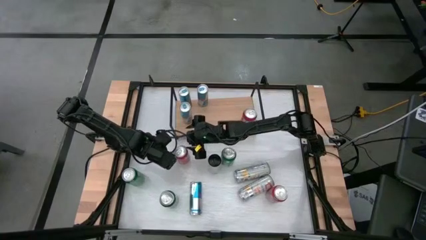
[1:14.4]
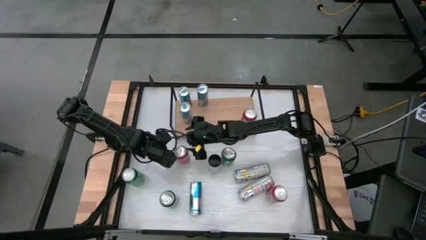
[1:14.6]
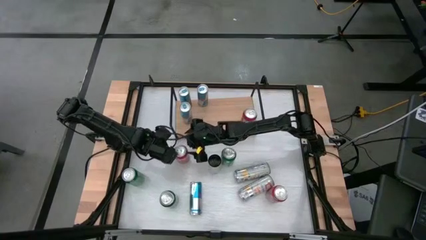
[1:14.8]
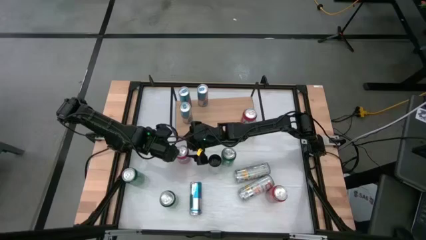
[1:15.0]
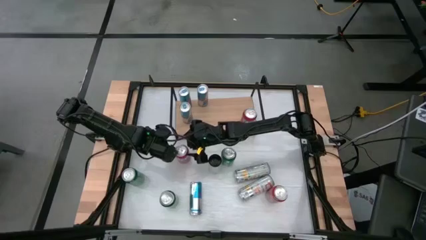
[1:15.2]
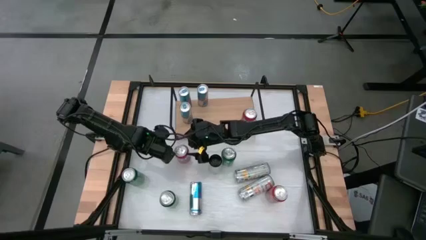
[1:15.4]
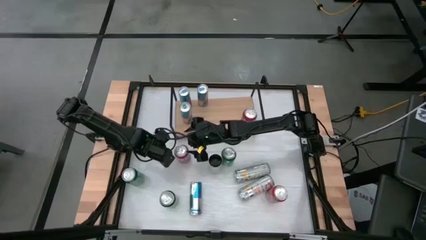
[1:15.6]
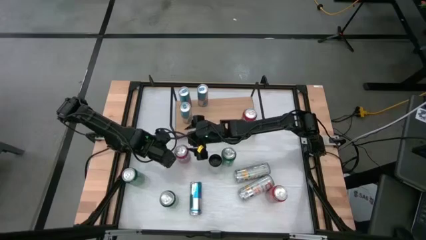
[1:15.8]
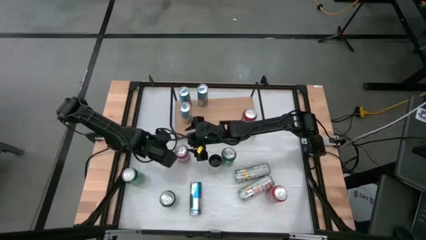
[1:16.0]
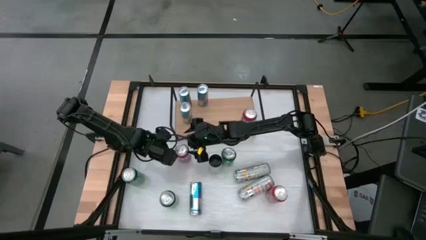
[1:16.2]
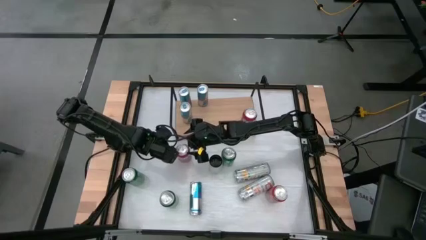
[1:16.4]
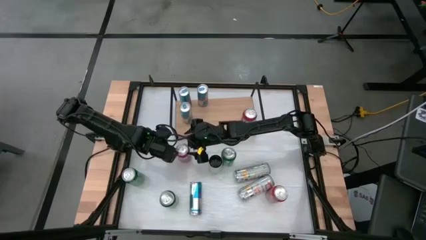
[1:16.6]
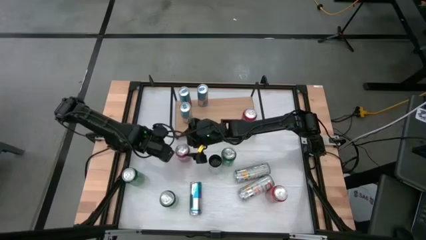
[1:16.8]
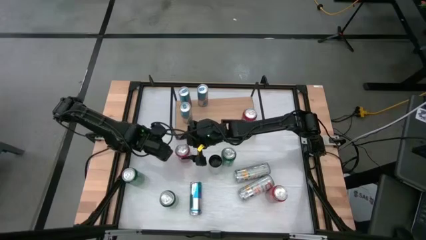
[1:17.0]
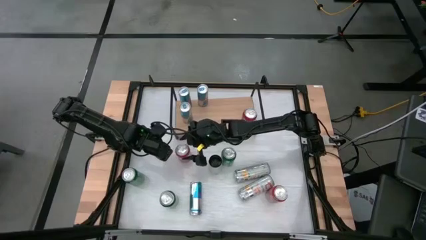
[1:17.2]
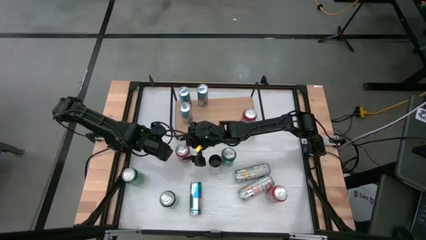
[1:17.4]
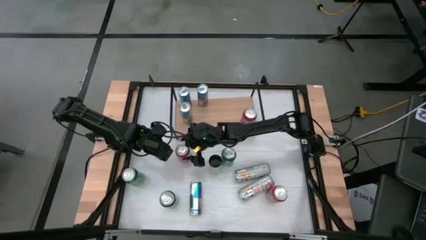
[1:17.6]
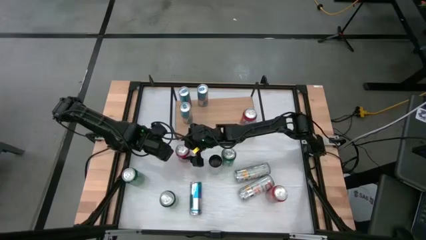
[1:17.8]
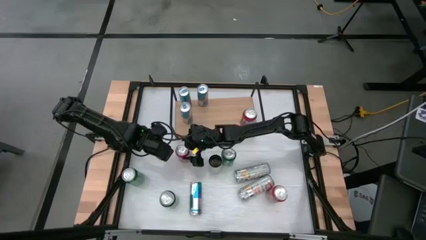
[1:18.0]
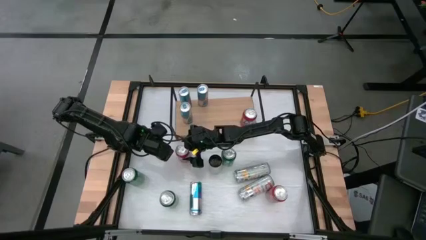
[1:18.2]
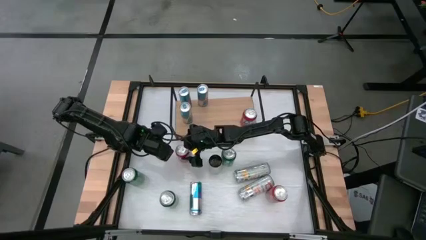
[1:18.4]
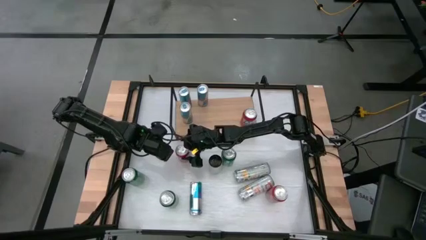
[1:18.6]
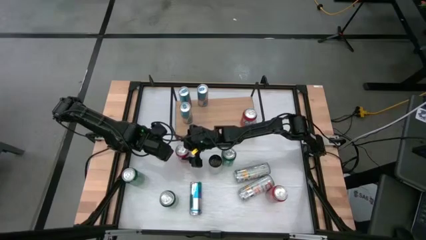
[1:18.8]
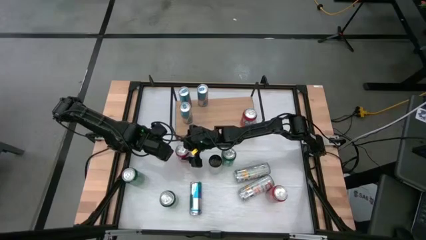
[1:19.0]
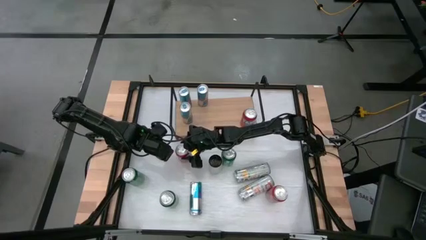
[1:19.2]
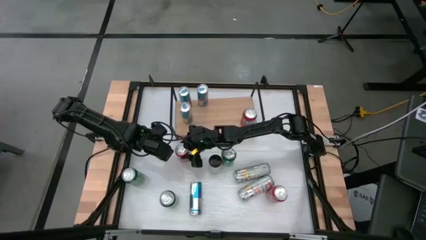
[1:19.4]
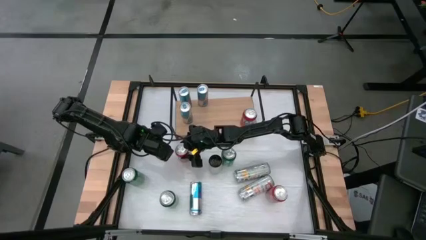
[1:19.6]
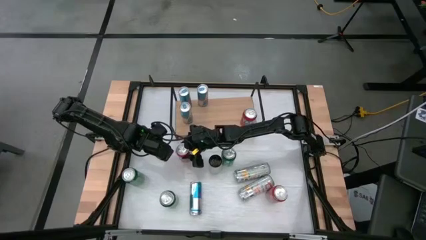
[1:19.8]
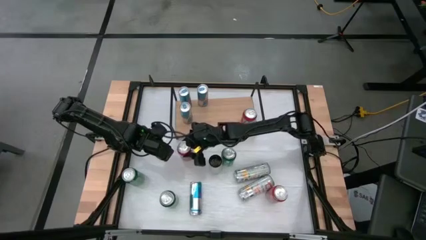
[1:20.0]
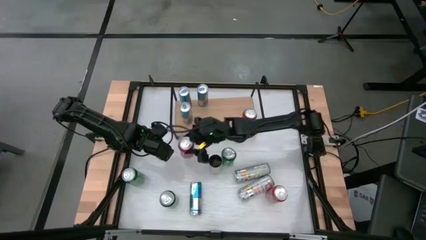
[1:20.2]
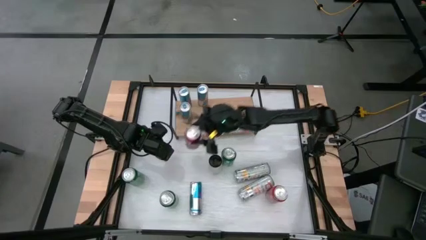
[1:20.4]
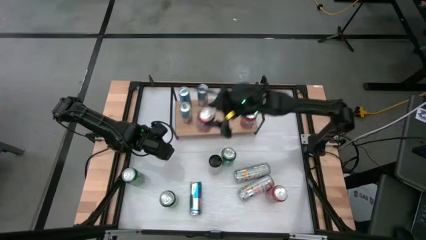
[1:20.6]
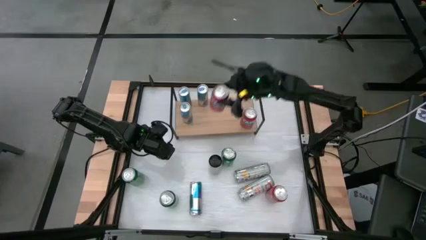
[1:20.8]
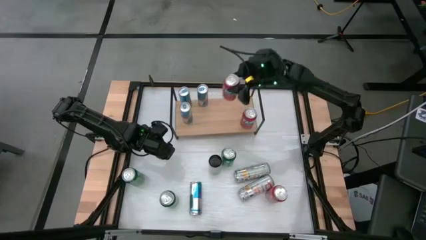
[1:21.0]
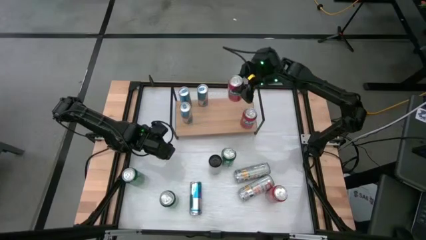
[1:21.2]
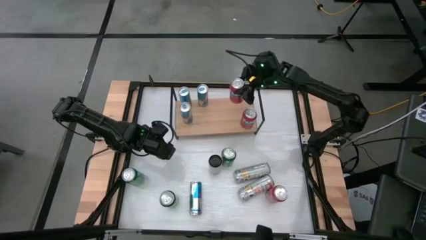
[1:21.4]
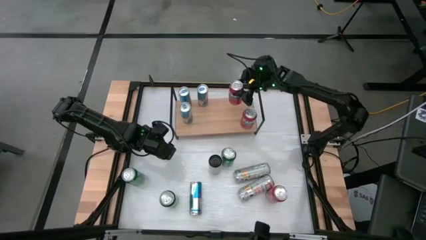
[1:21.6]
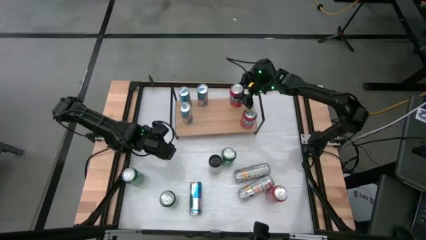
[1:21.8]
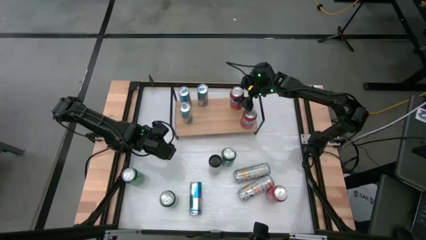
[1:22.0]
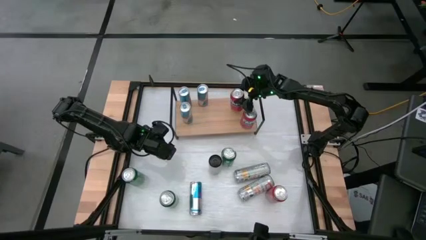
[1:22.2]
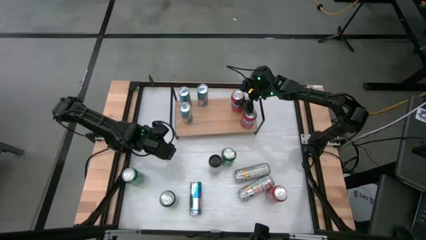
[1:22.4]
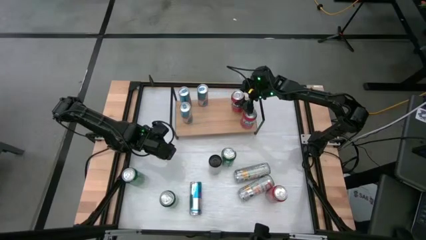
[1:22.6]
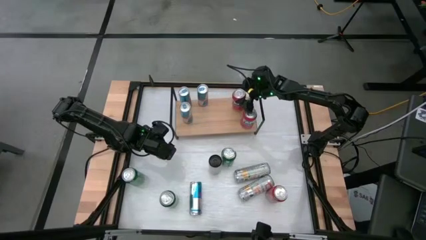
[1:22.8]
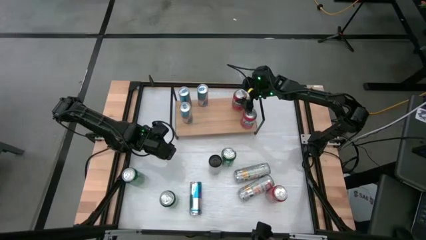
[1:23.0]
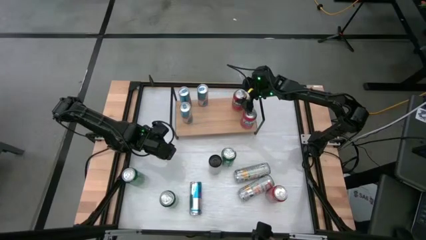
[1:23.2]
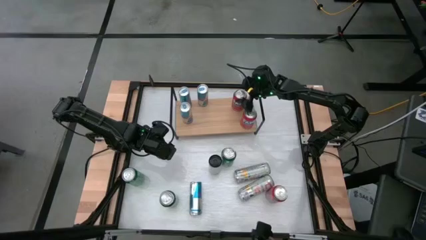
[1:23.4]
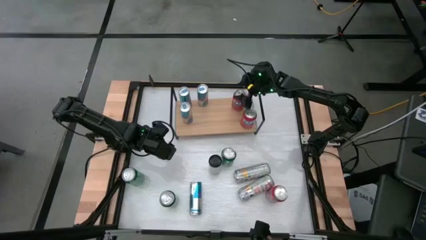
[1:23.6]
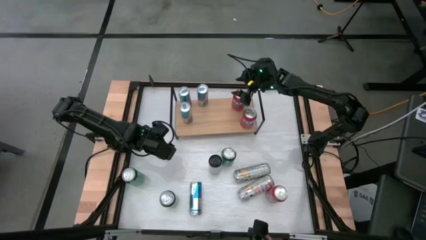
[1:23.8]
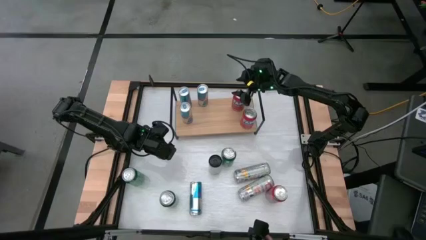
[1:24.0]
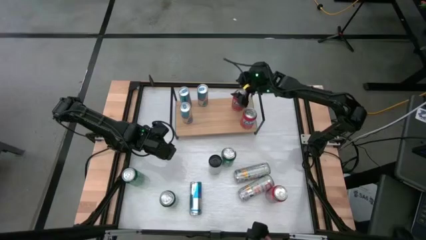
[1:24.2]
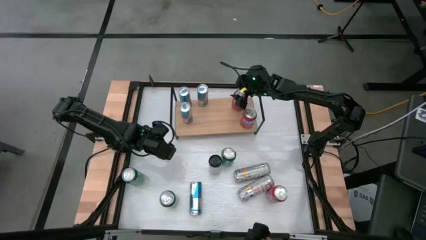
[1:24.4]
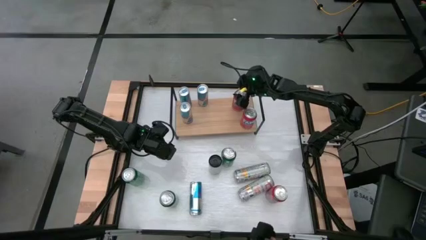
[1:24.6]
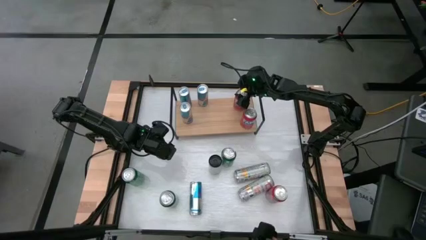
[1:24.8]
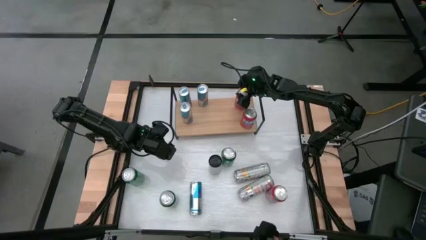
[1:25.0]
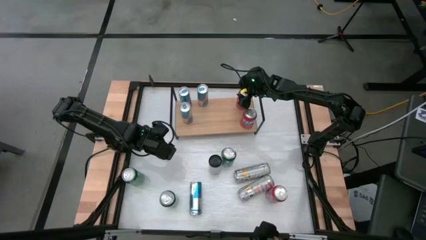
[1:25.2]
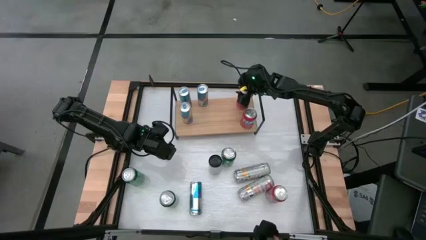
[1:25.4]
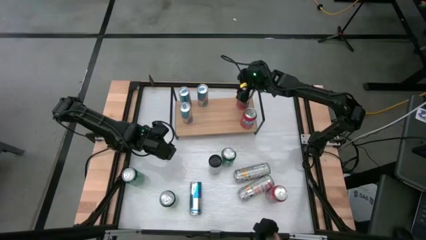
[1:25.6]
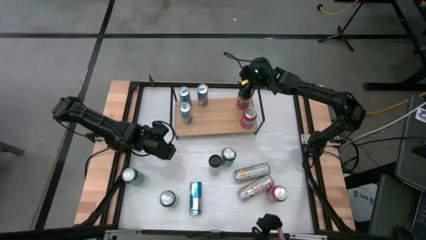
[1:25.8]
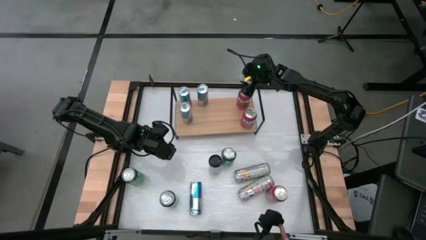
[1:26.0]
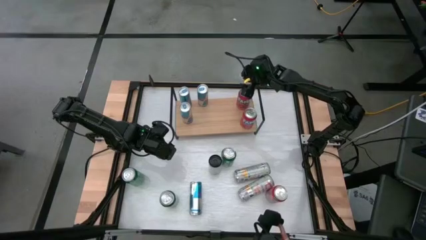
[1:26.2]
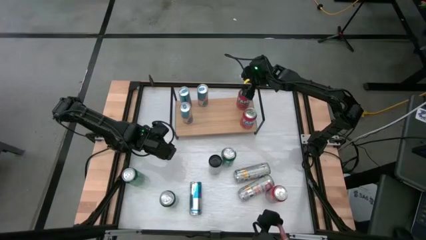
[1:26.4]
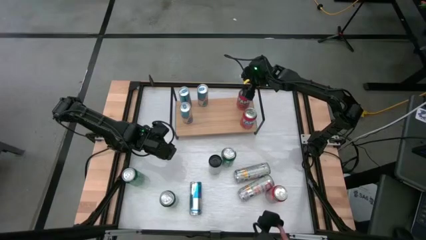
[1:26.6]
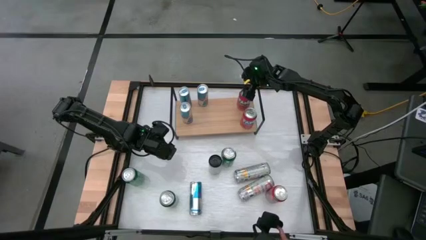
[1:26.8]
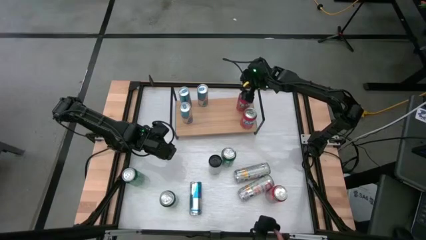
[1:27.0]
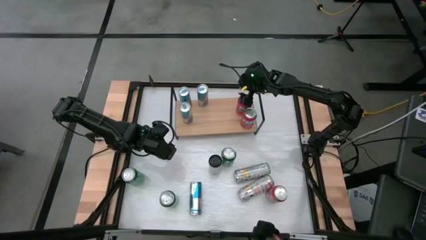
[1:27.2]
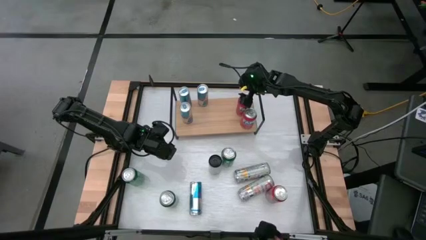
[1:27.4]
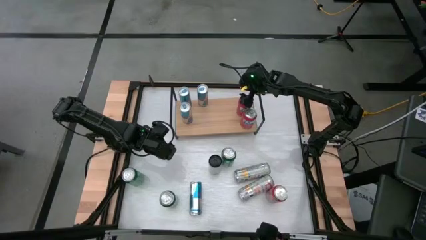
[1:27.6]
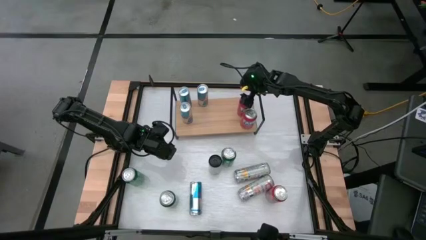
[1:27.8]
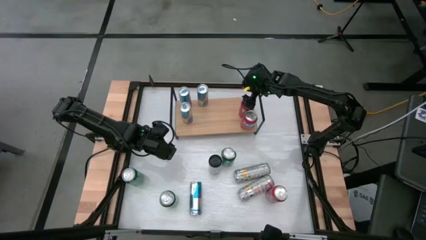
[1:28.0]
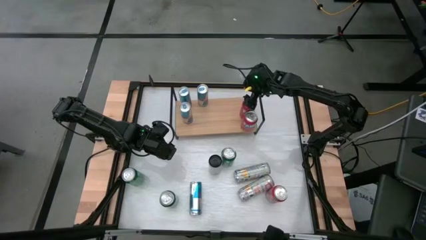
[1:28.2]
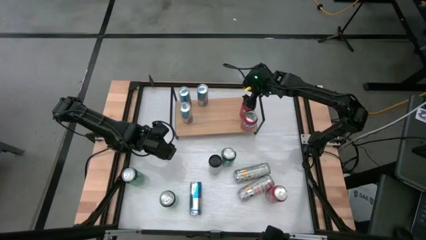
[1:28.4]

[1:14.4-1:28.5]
Task: Sort soda cans
Put the orange soda can on the shelf and align with the other orange soda can
